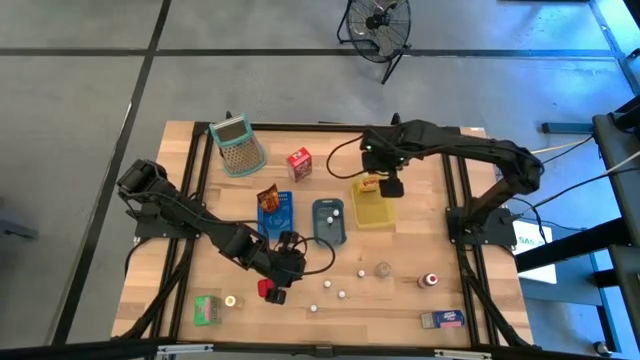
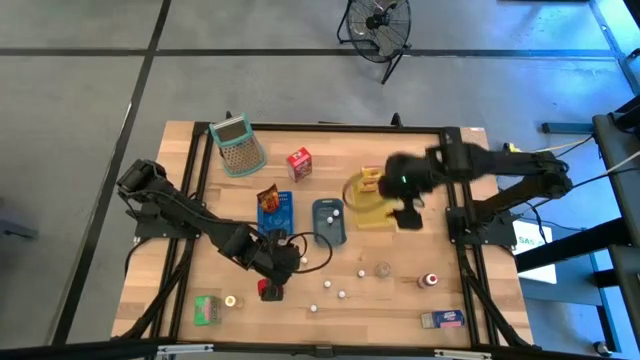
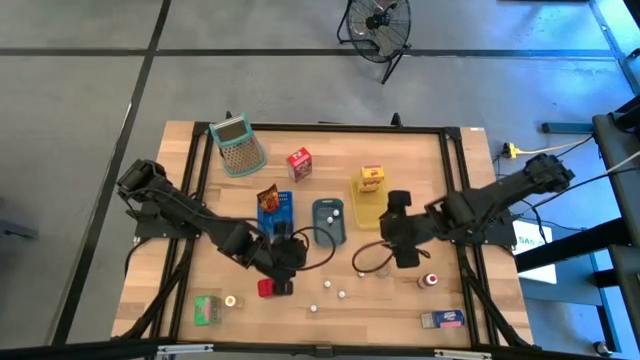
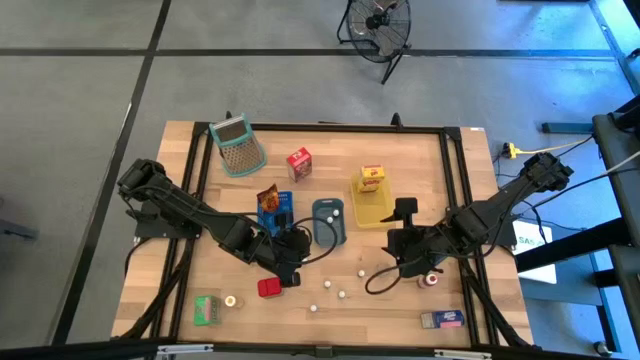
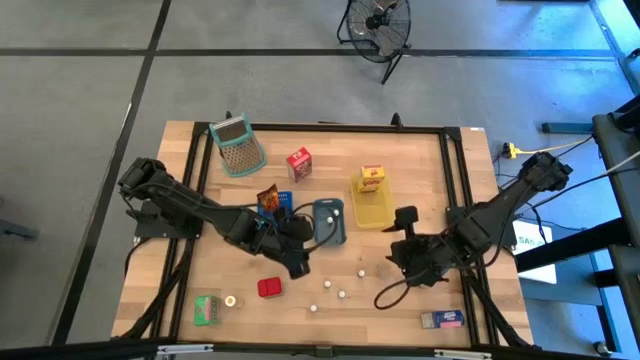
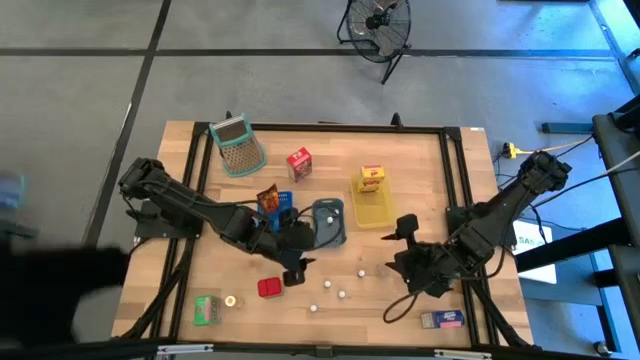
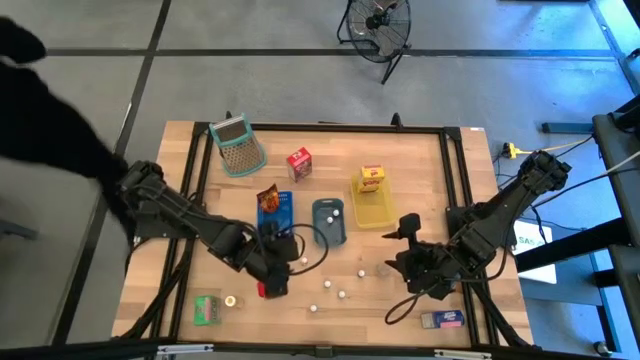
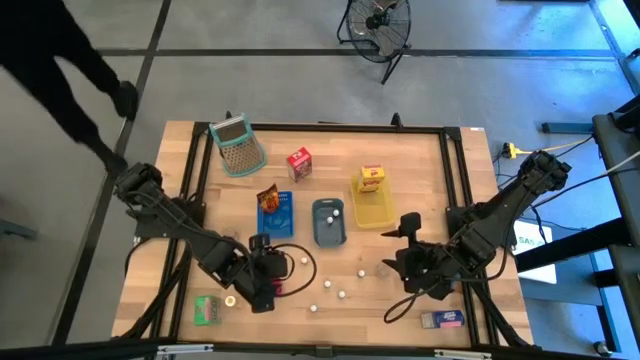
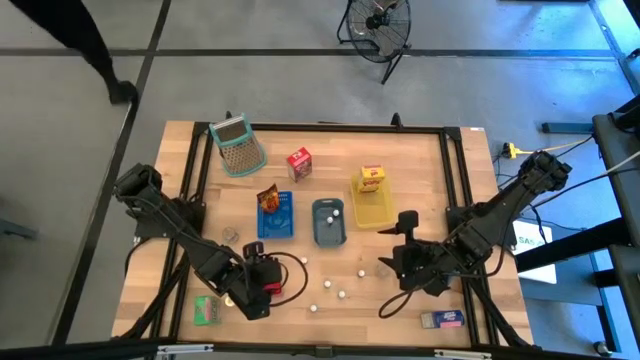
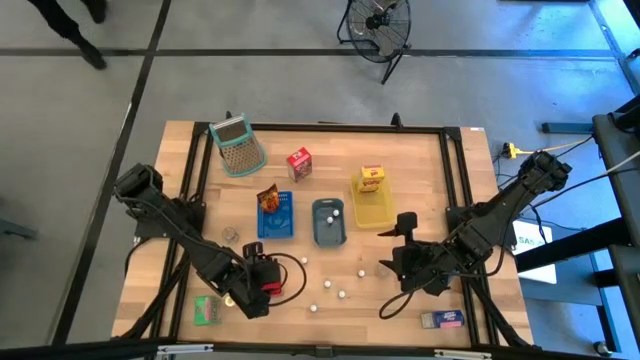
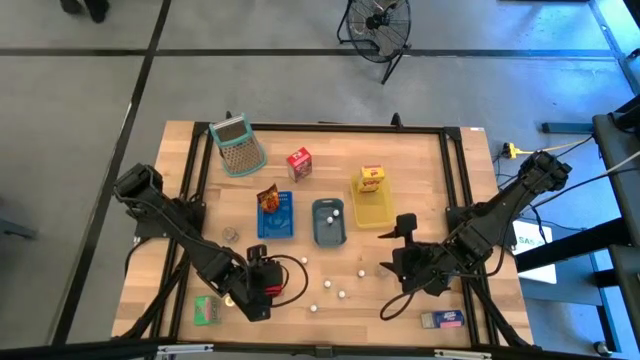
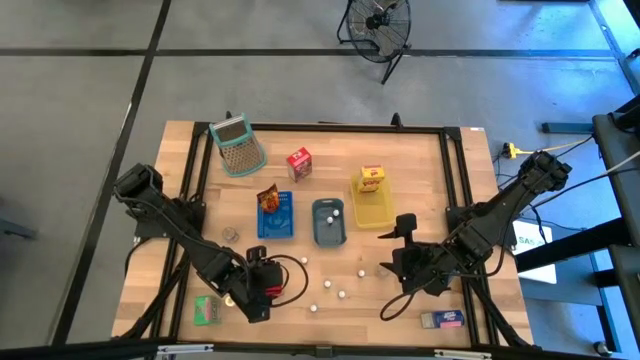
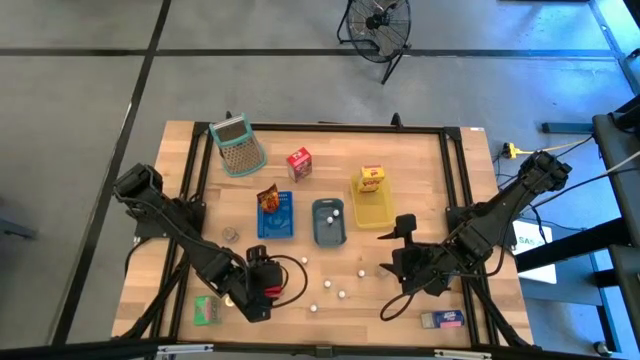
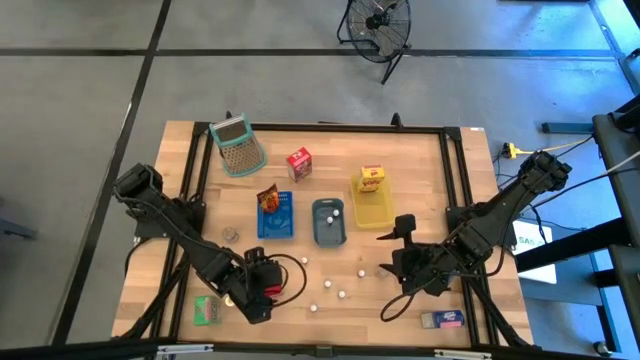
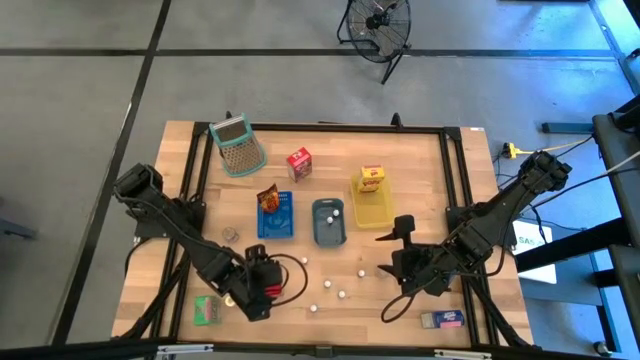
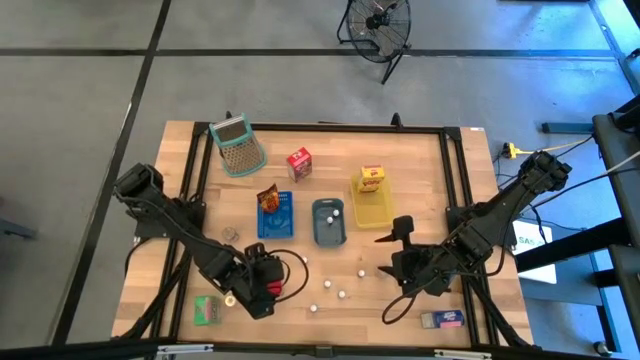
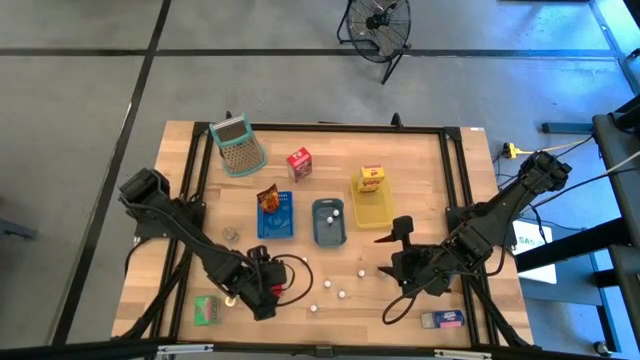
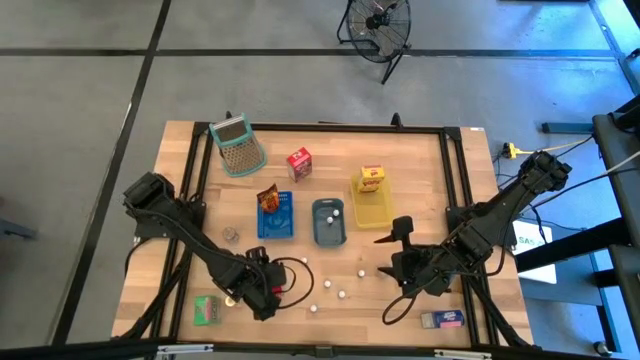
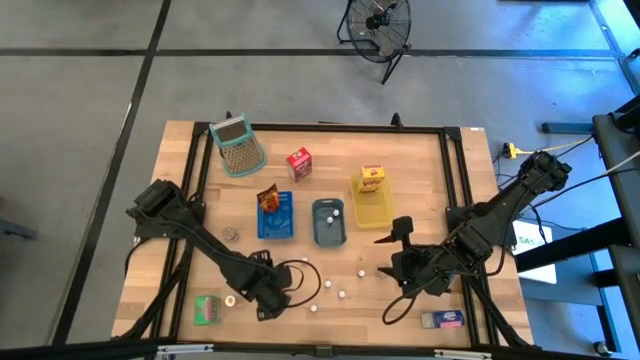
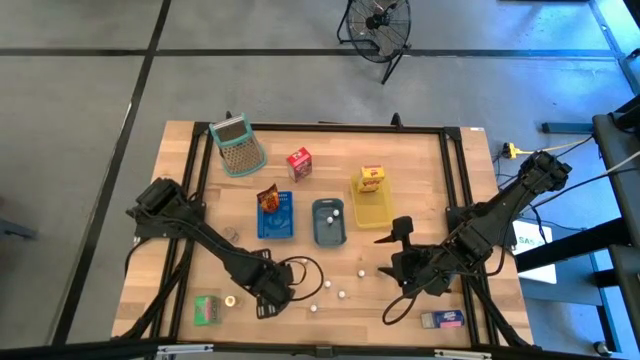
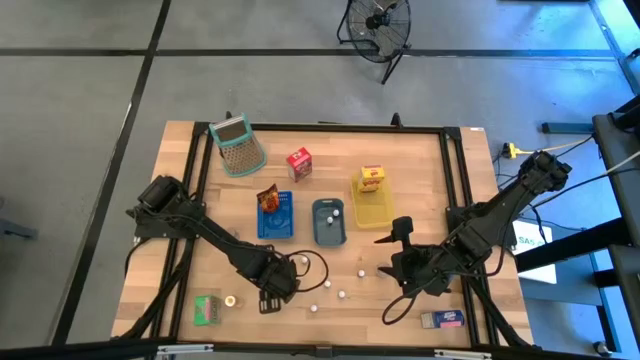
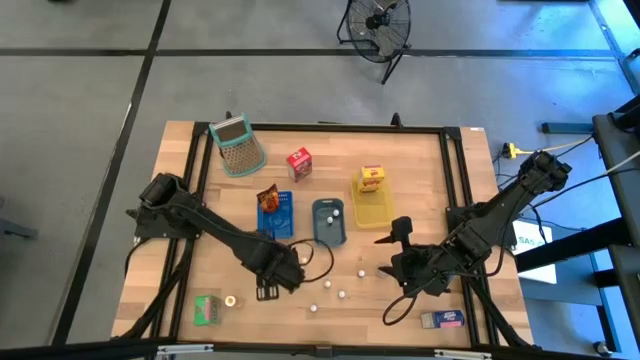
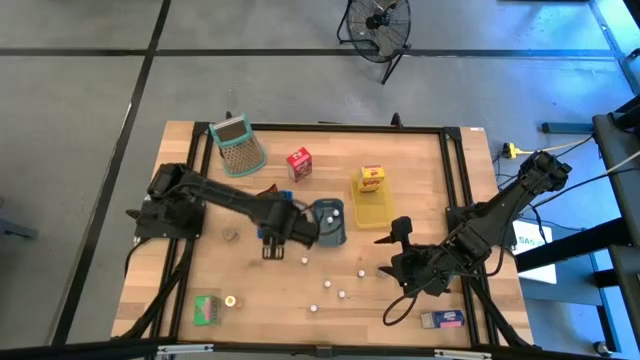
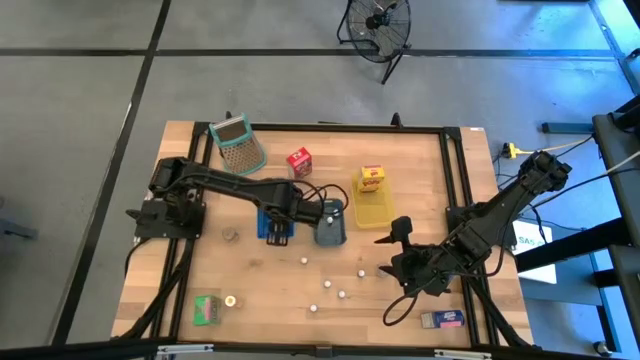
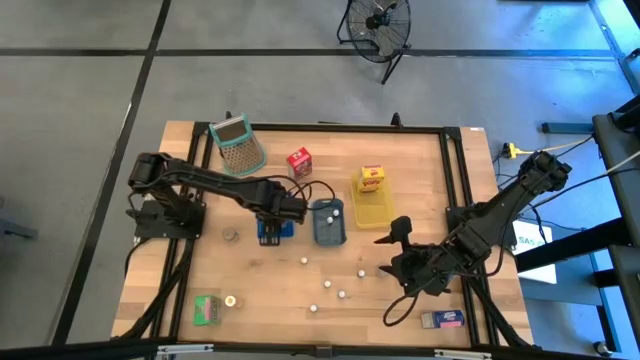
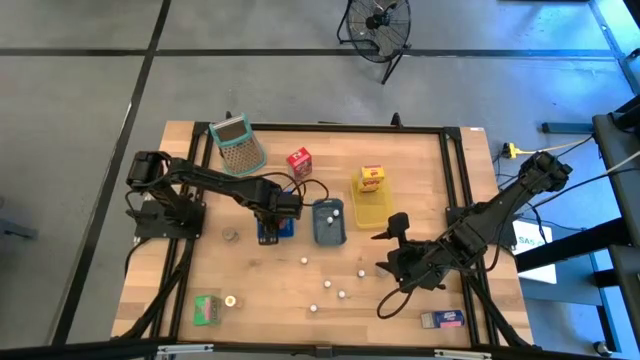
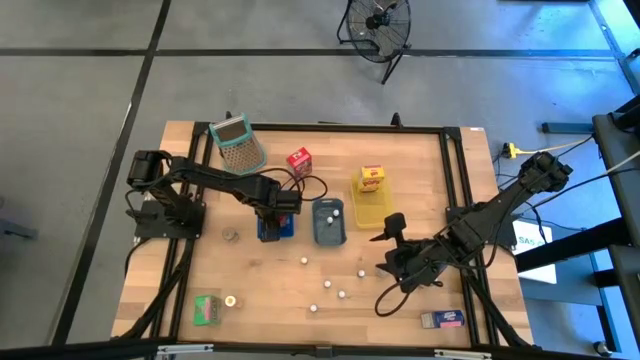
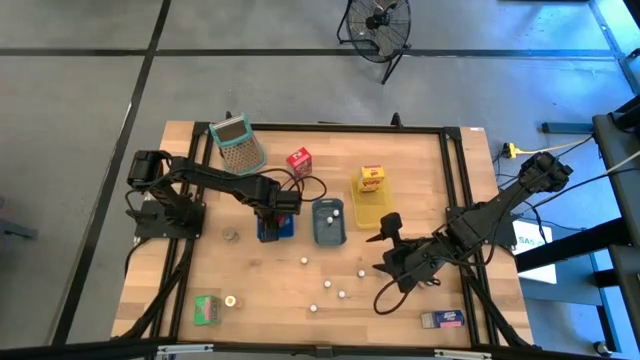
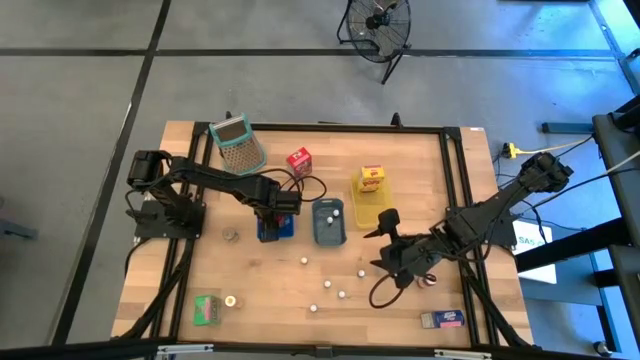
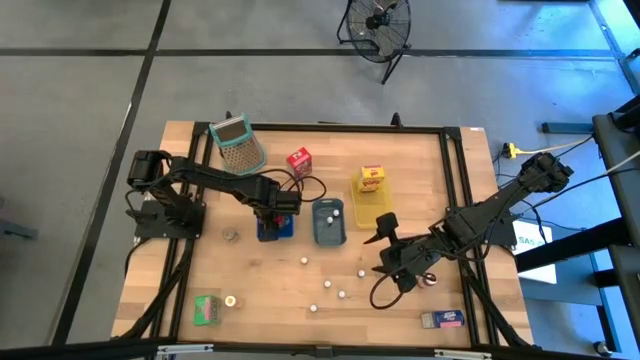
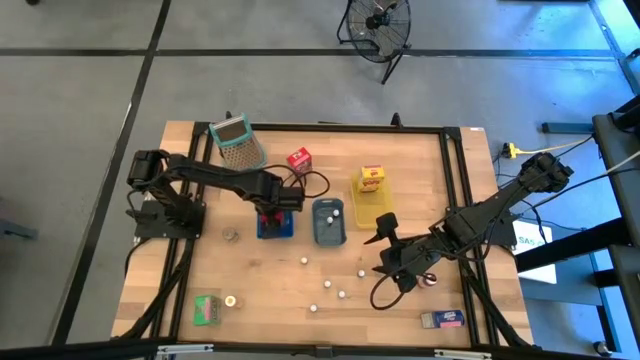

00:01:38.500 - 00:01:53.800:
Task: Pick & Place Kitchen Items
Put the red seasoning can into the blue bin

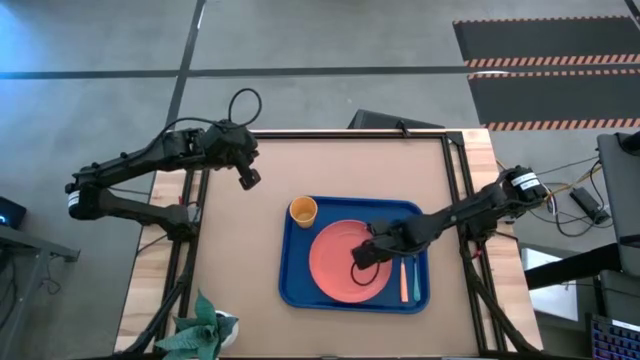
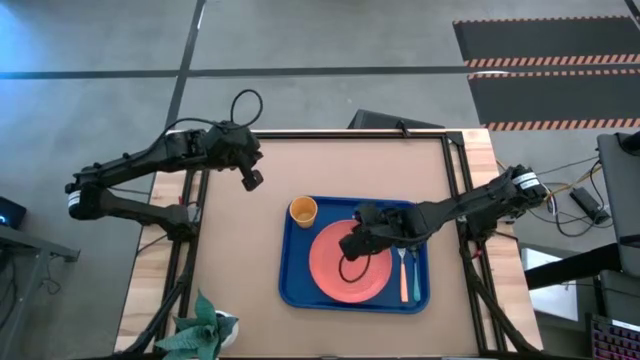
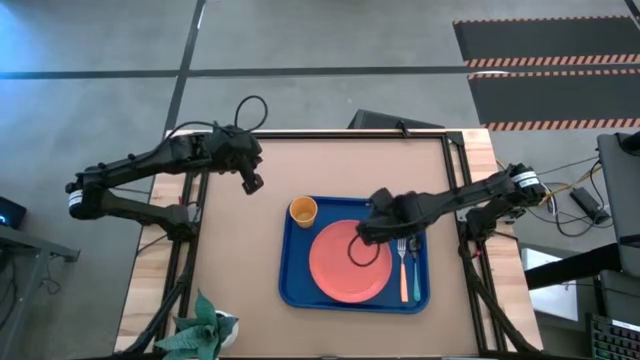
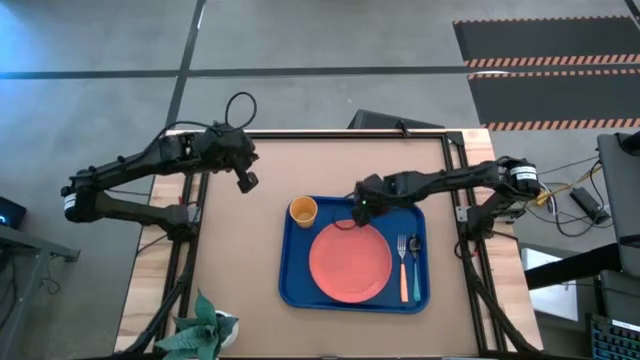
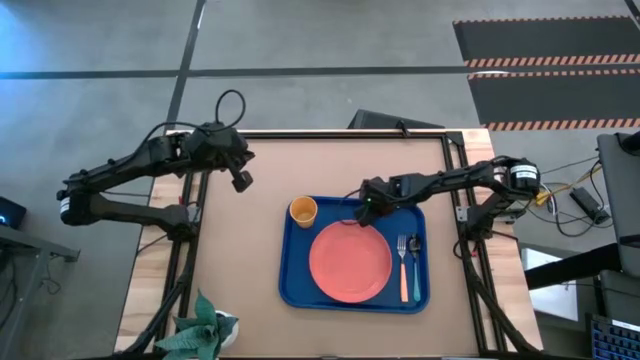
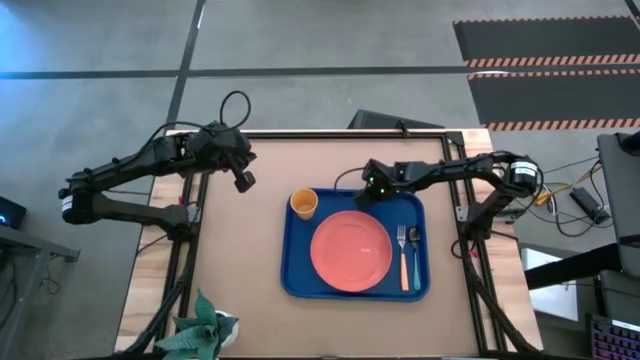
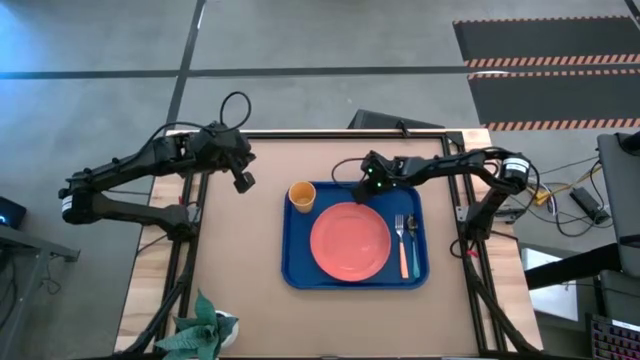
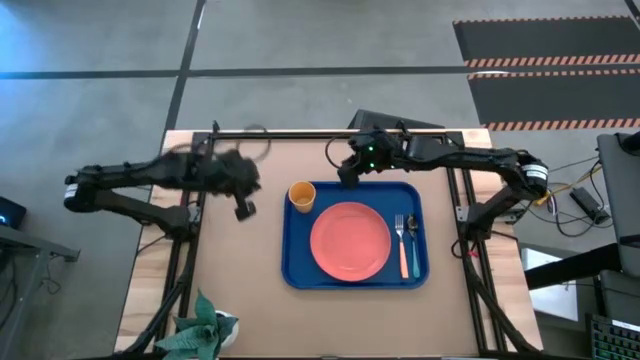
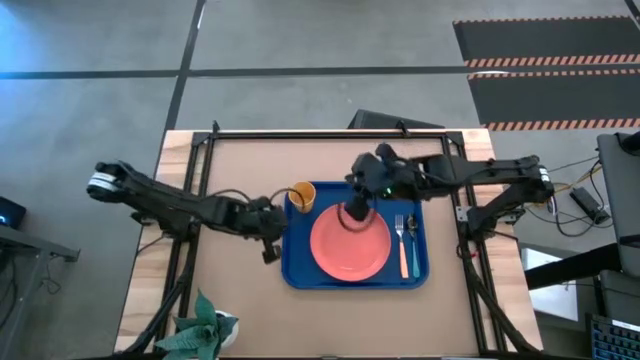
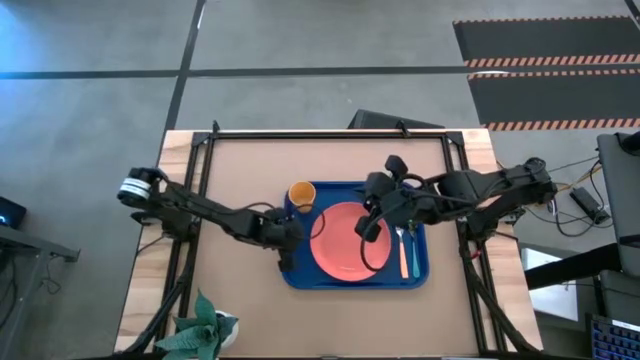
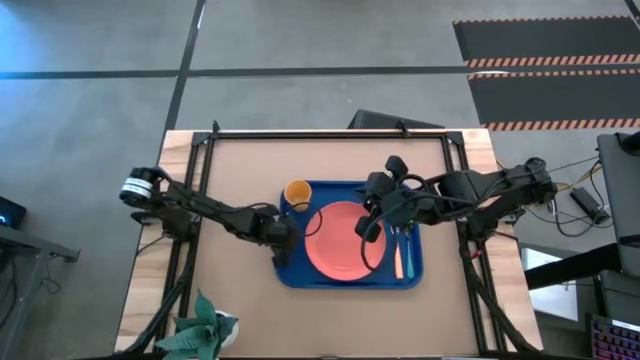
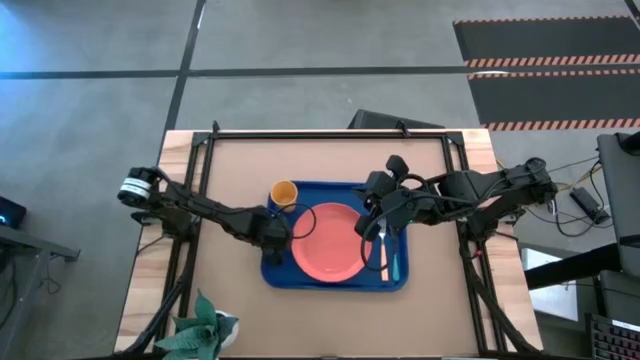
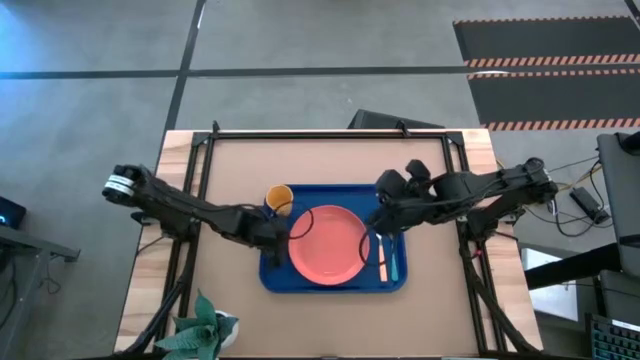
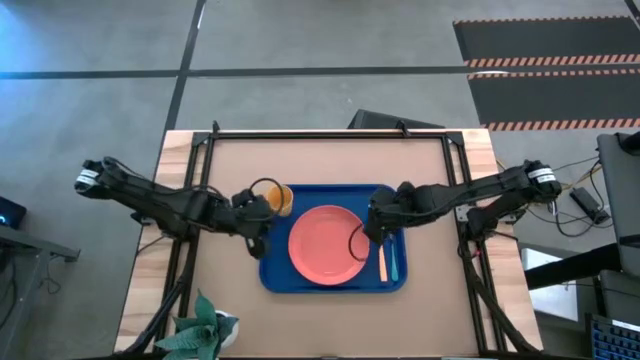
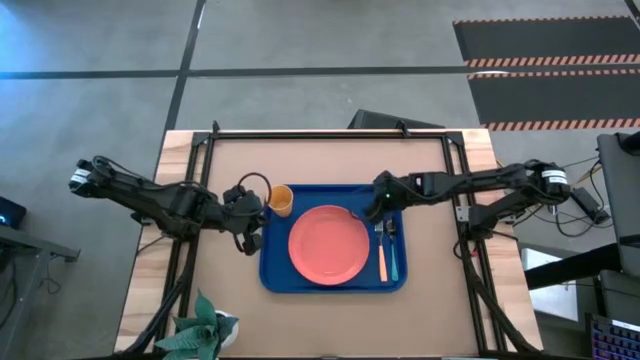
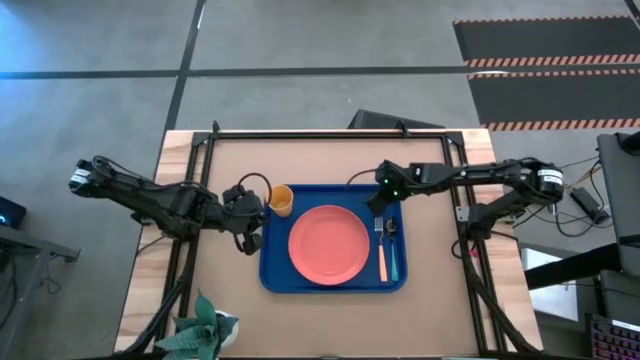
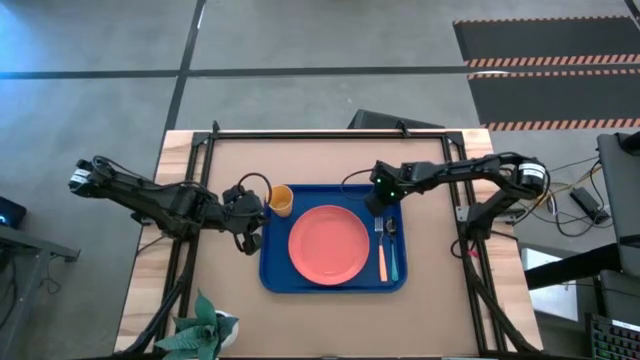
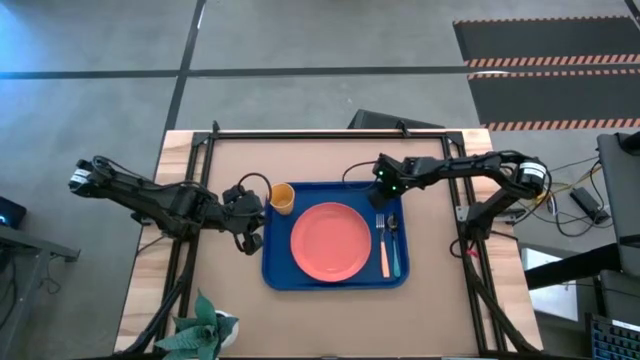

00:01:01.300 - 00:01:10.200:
Task: Pick and place plate/cup/fork/spoon on tray
Move the blue tray to the top center of the table
